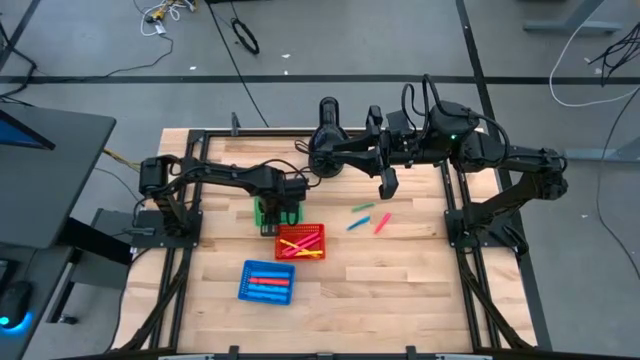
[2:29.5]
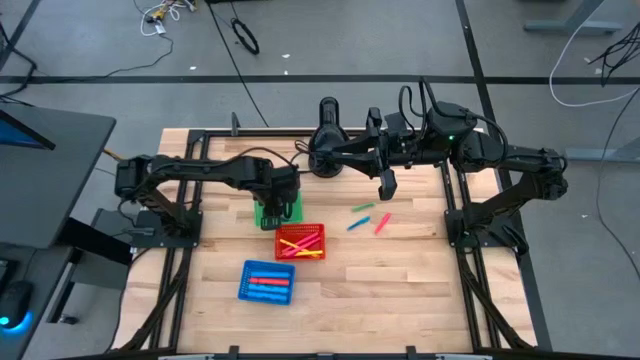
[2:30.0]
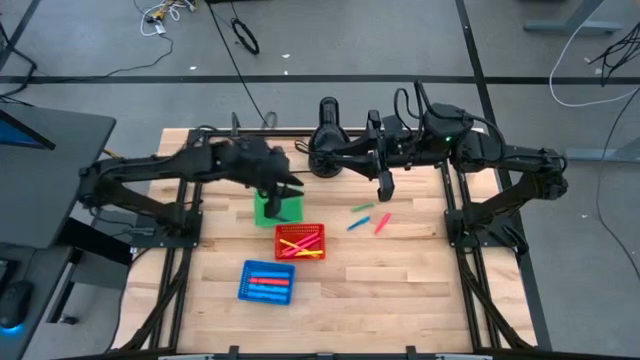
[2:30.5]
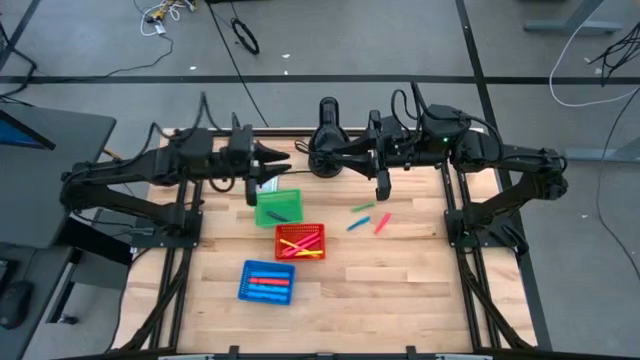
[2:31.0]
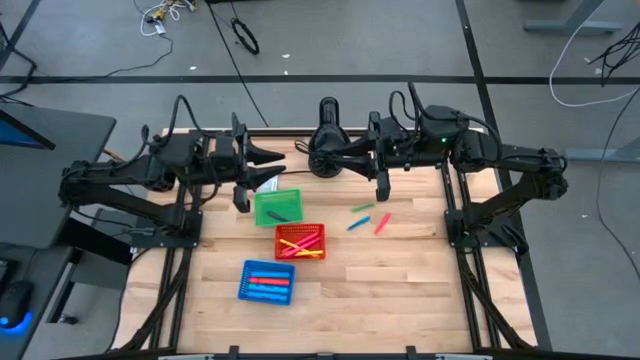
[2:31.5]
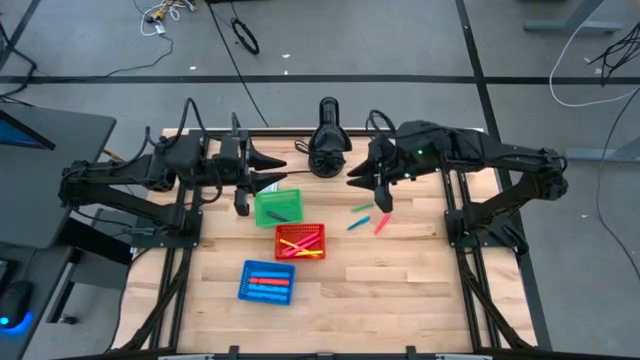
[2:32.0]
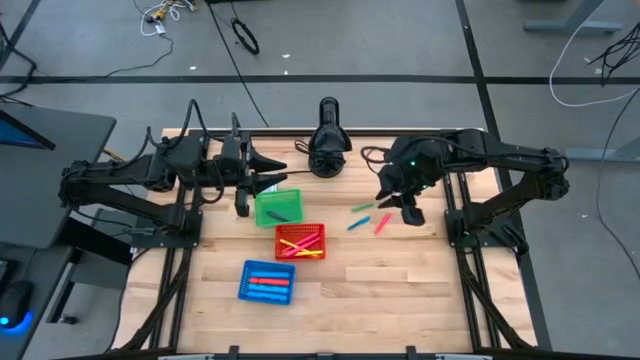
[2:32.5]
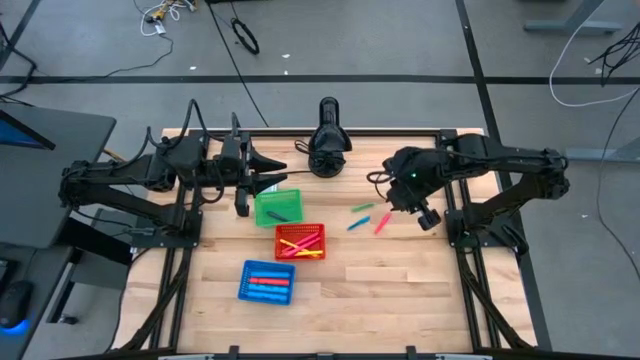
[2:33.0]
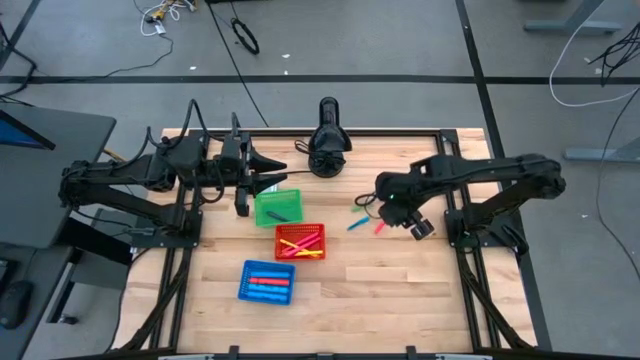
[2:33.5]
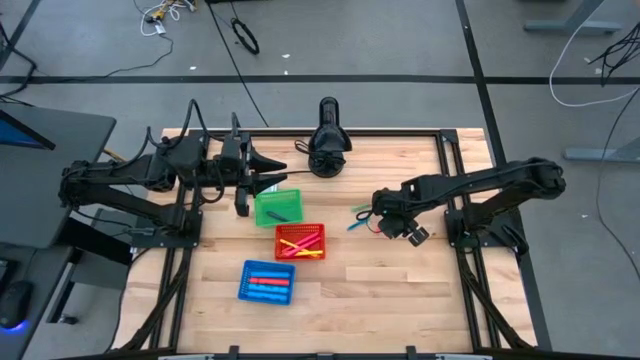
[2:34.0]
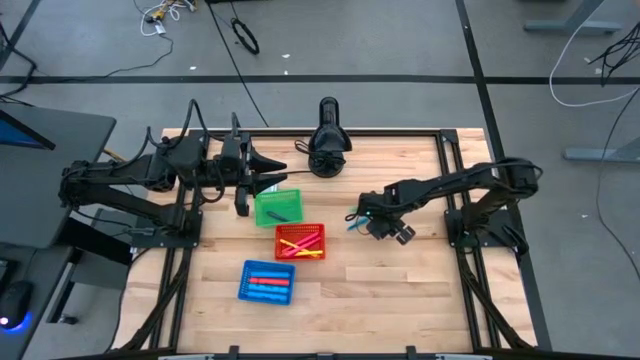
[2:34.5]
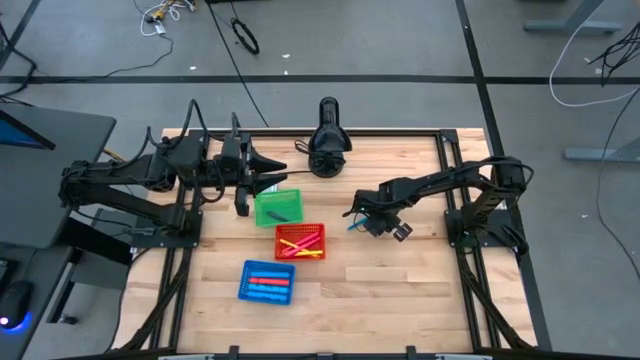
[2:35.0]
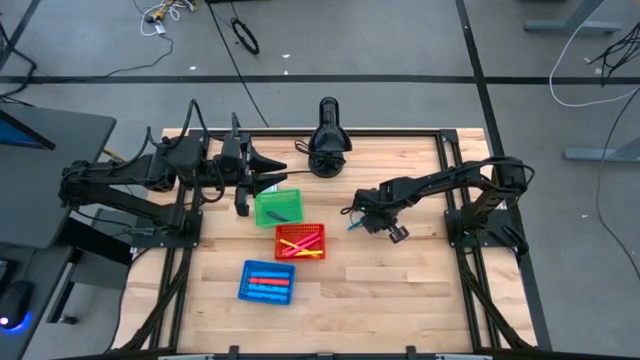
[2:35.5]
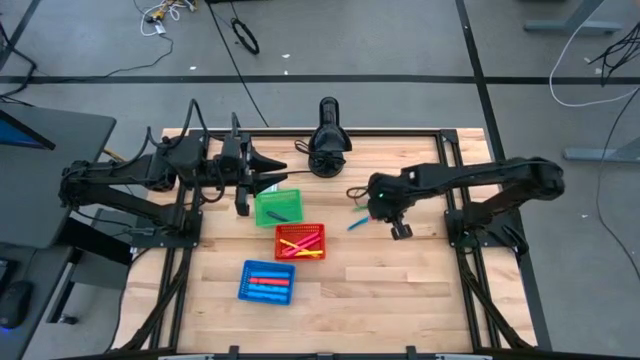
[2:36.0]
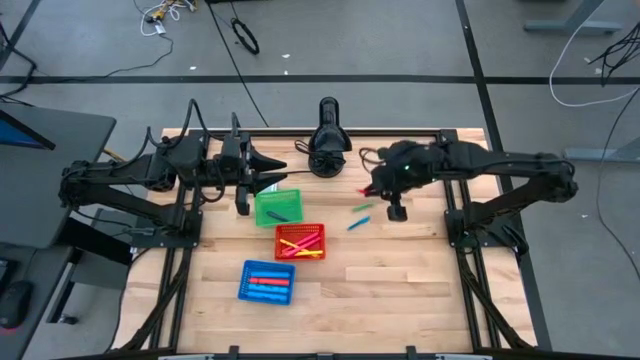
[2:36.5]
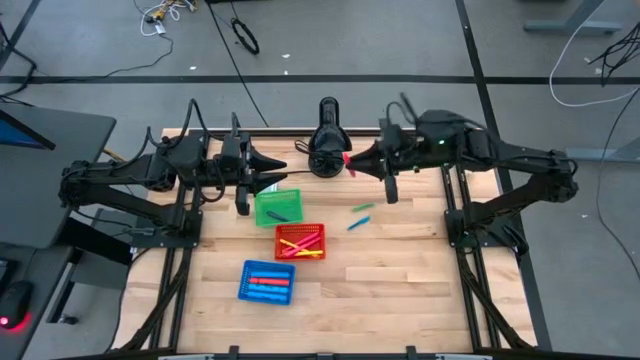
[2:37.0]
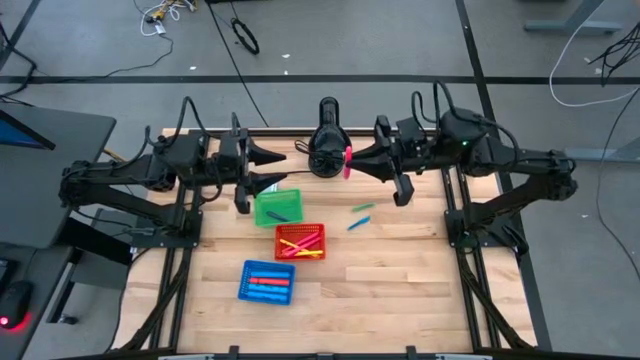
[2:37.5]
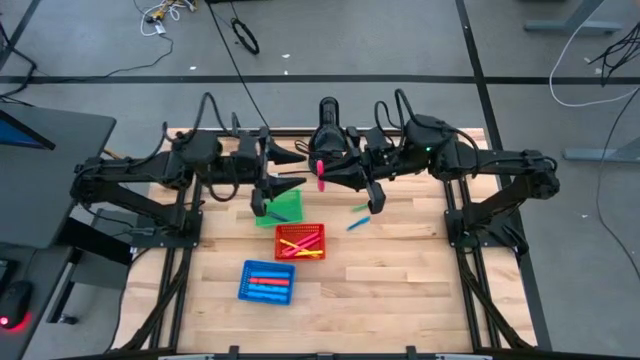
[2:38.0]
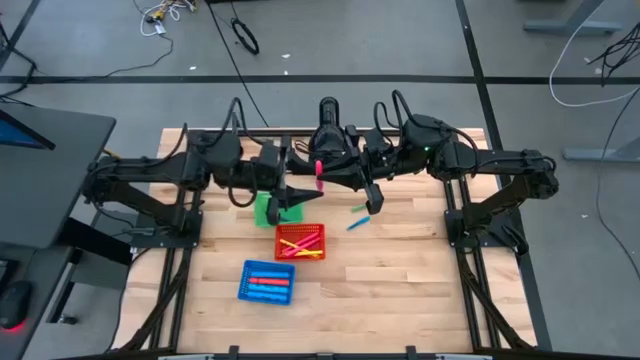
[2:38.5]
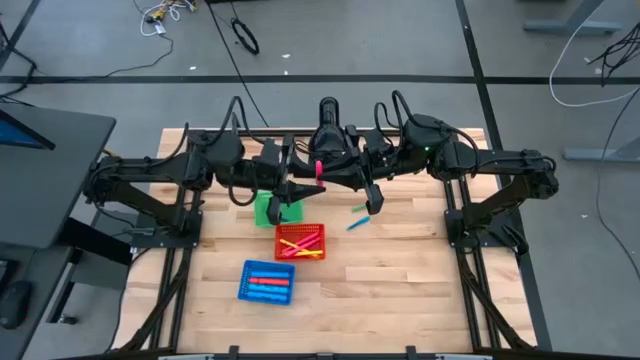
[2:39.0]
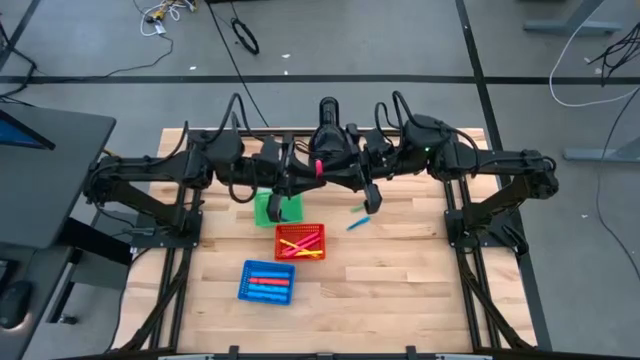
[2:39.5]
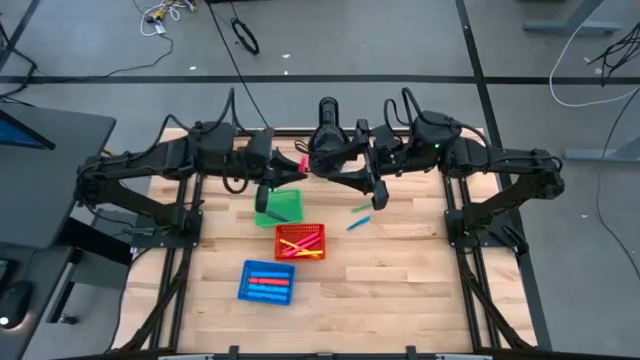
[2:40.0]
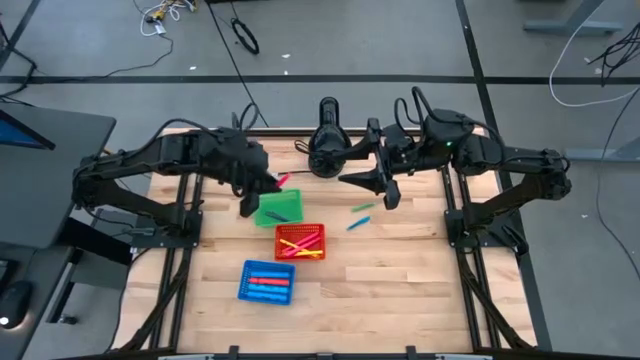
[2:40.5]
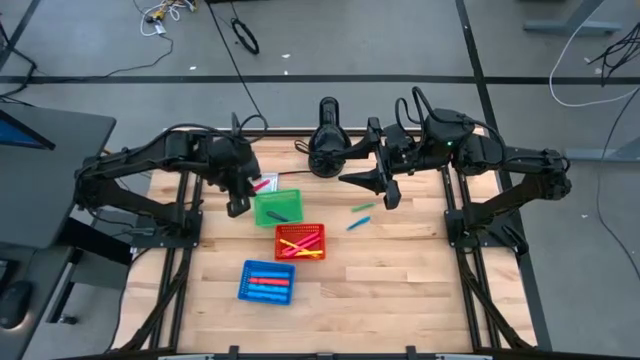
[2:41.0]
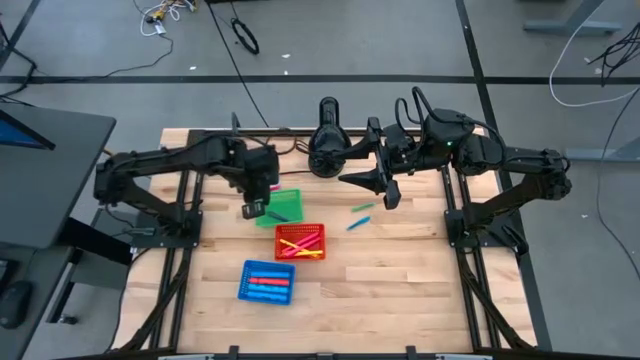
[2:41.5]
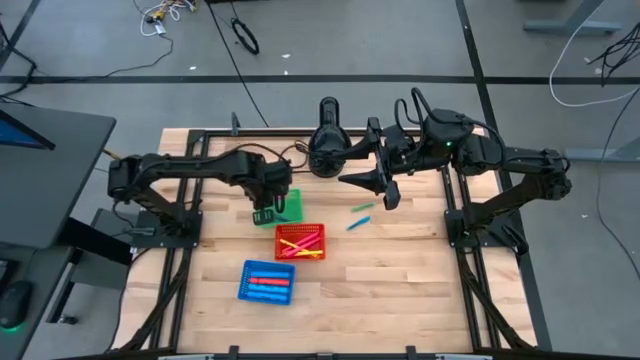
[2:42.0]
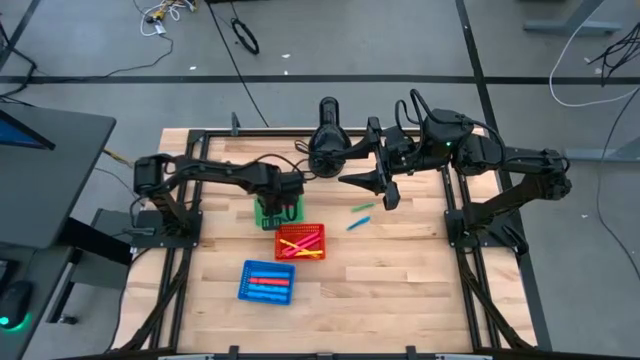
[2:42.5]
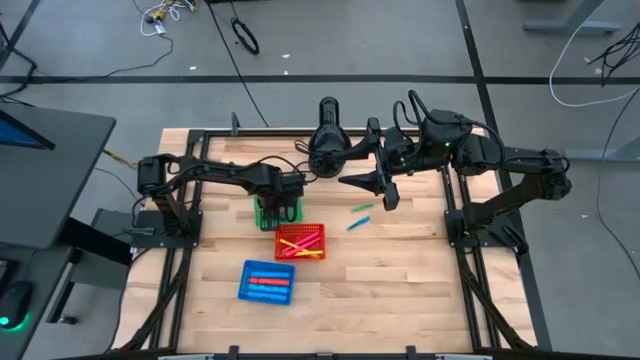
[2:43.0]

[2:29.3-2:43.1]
Task: Pick & Place Markers
Put the pink pen into the green bin

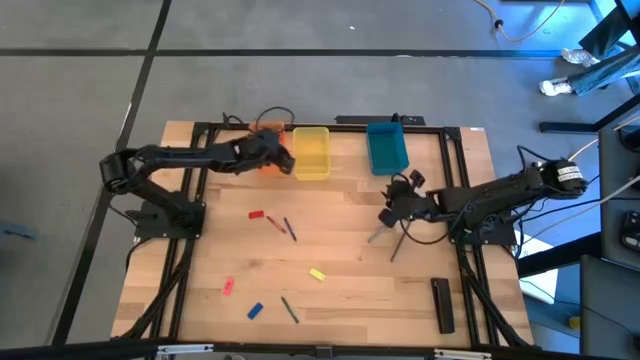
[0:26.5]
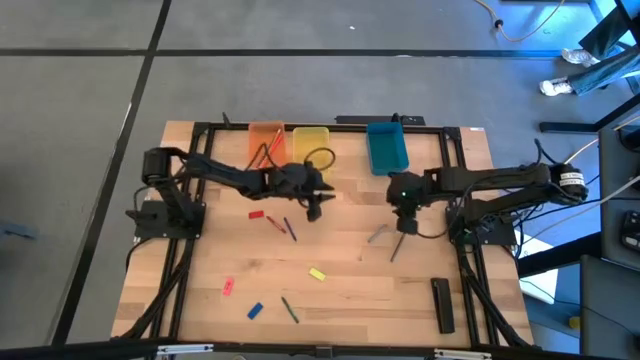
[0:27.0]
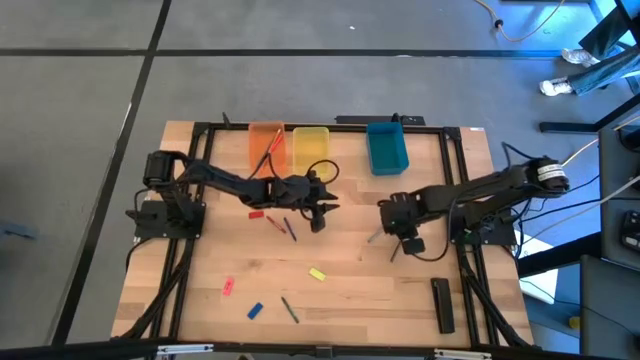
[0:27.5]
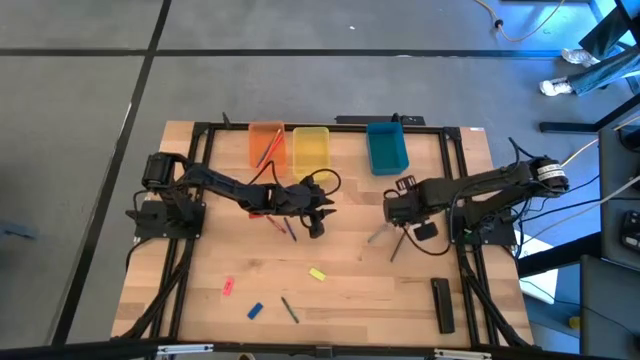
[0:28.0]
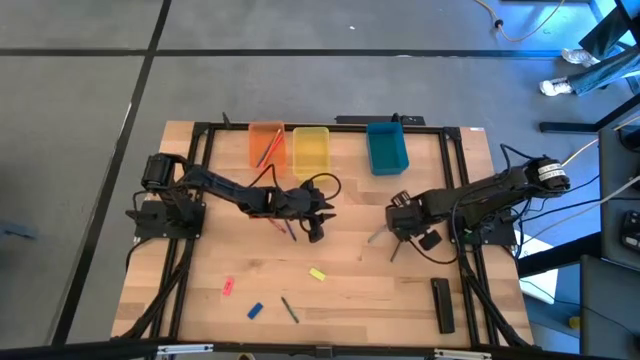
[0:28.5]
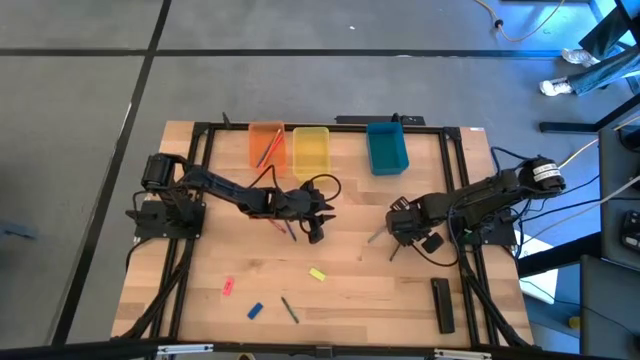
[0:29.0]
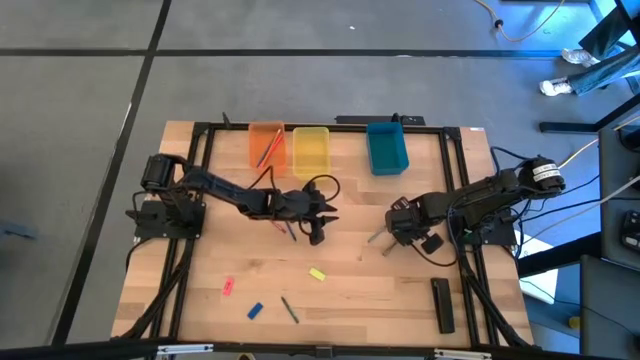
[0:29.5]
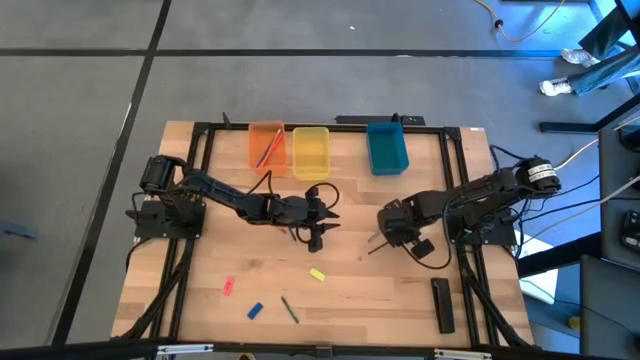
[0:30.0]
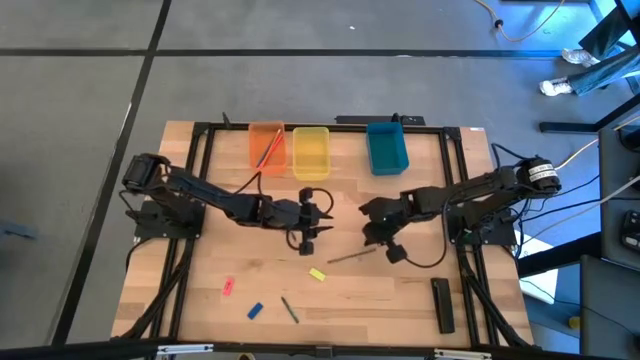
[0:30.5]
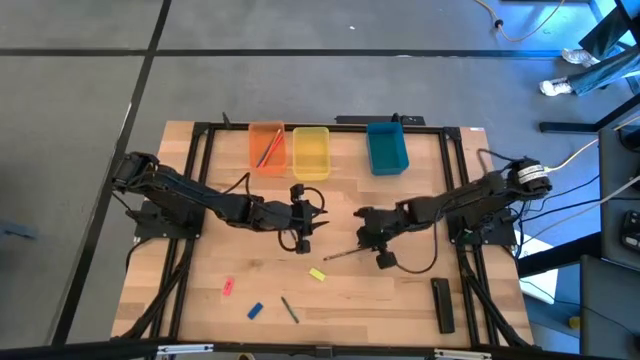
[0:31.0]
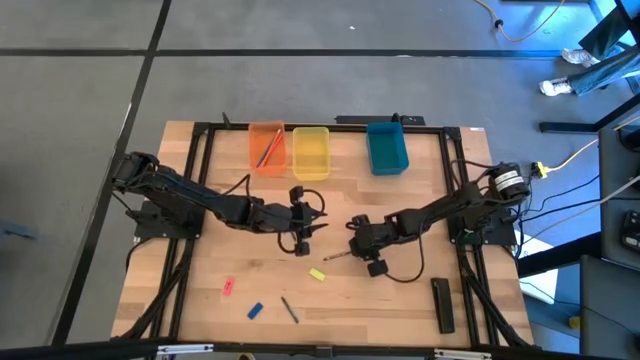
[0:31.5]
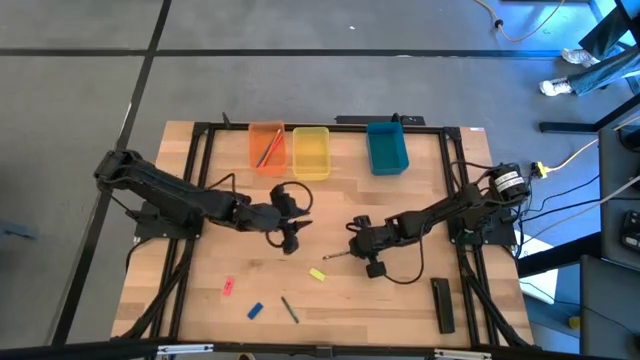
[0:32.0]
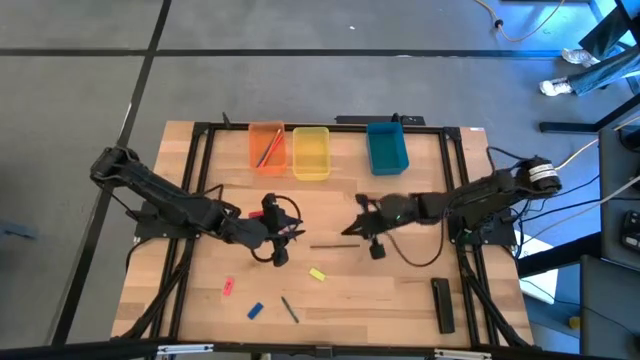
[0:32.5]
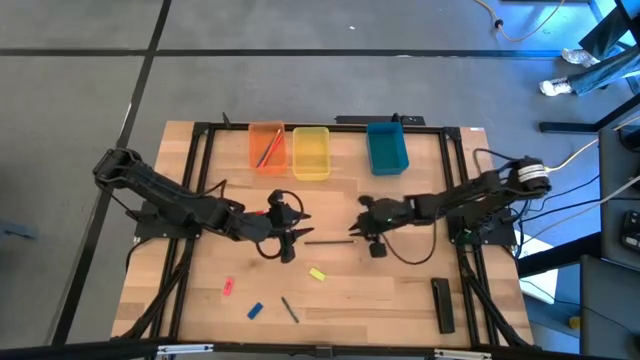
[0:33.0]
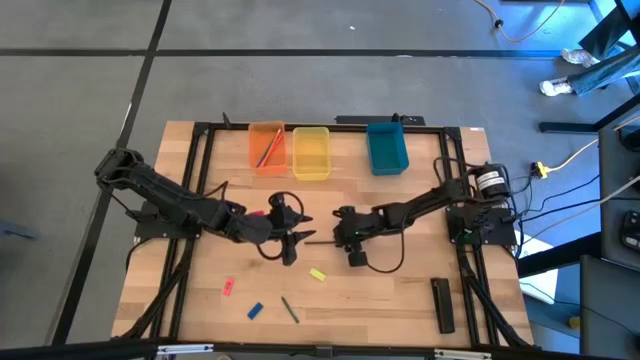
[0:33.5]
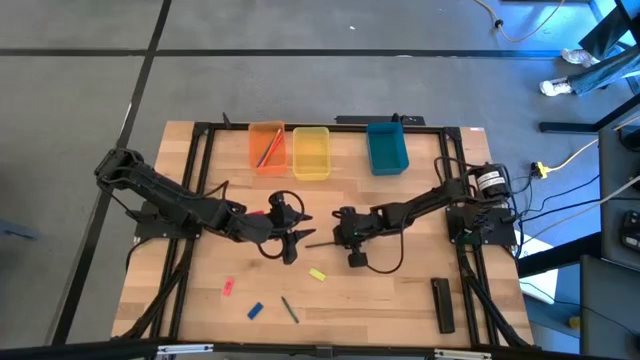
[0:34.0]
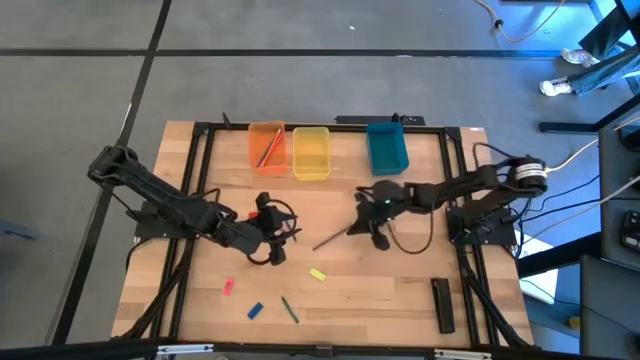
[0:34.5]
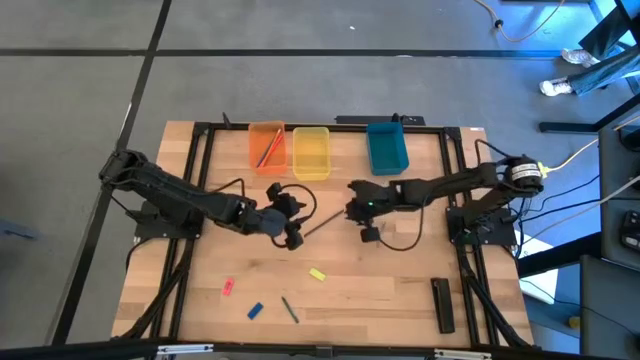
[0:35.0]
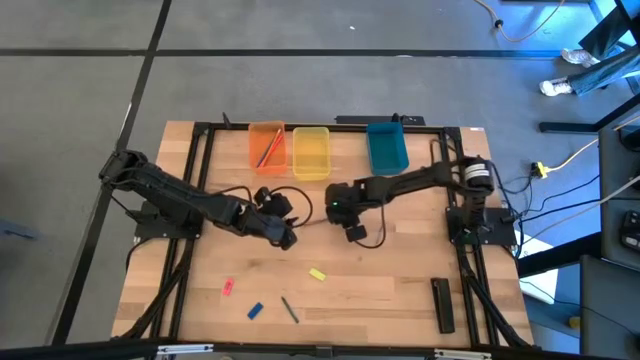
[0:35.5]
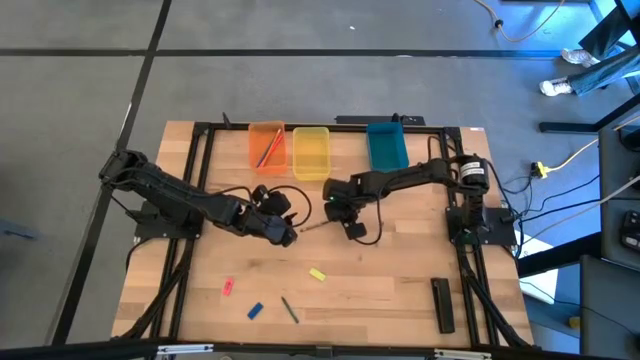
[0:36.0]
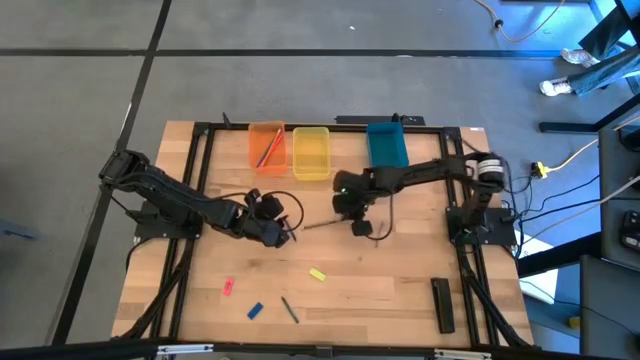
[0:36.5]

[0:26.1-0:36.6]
Task: Sort crayons/erasers/pens/pencils in bins
Put the black pencil into the orange bin
